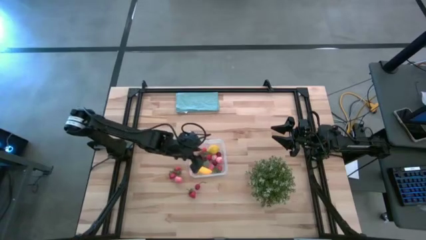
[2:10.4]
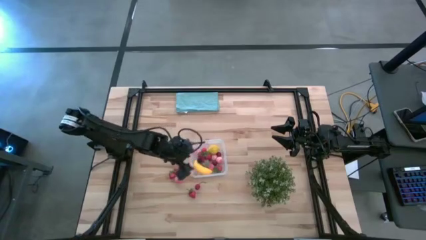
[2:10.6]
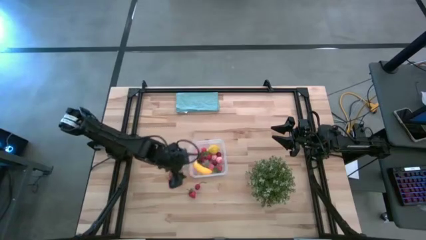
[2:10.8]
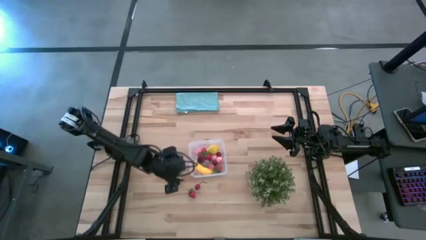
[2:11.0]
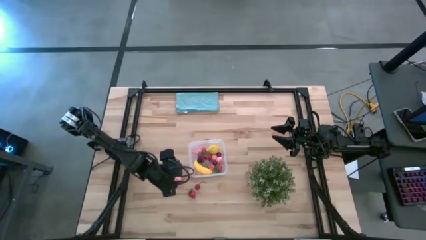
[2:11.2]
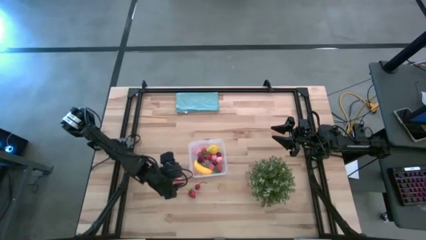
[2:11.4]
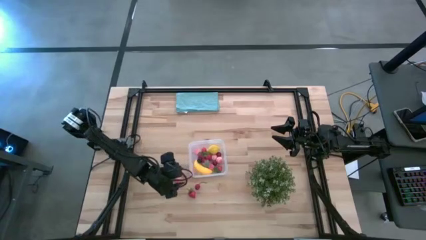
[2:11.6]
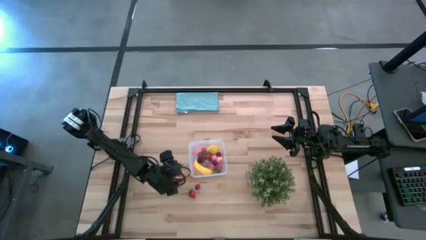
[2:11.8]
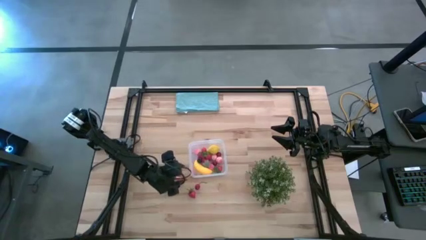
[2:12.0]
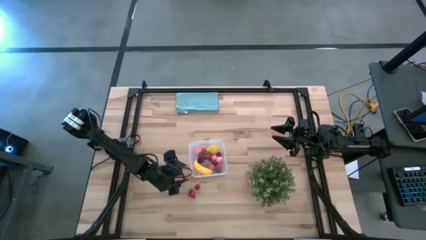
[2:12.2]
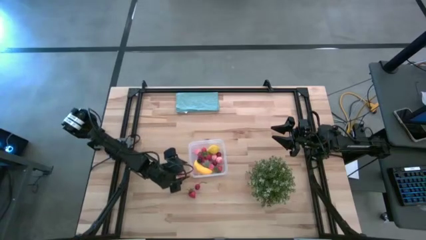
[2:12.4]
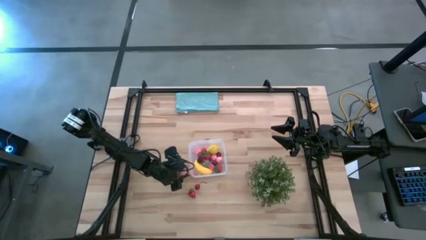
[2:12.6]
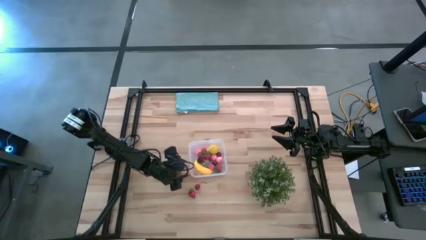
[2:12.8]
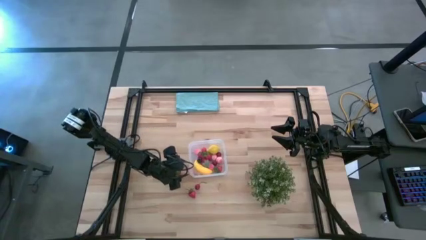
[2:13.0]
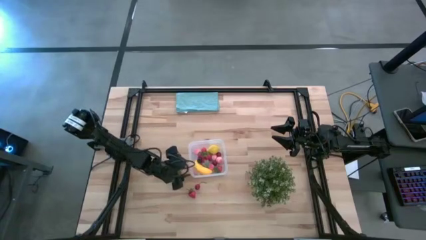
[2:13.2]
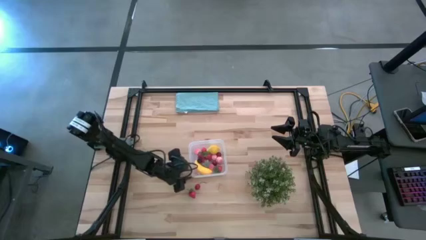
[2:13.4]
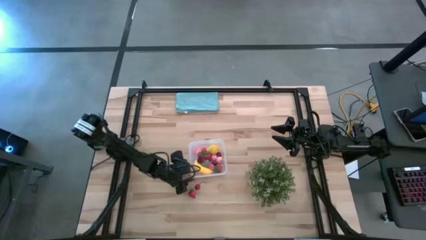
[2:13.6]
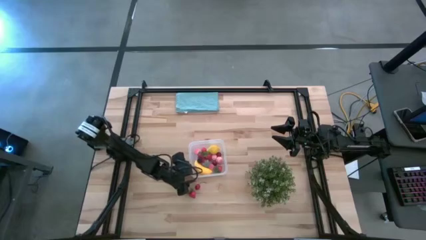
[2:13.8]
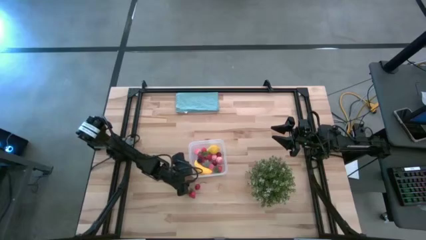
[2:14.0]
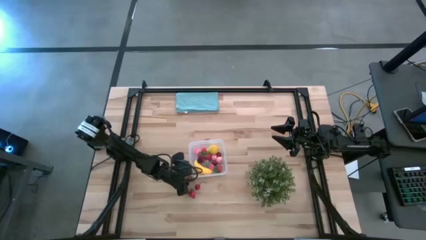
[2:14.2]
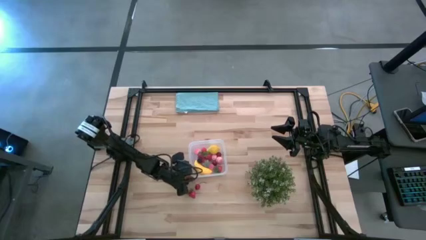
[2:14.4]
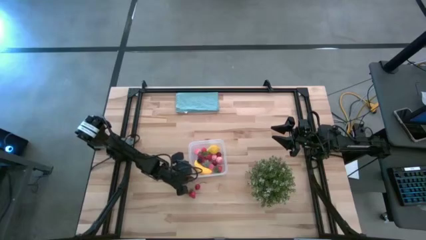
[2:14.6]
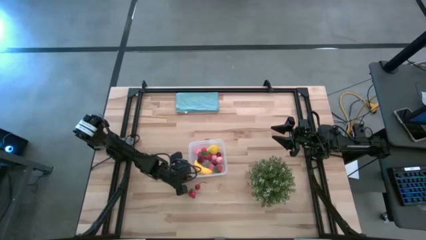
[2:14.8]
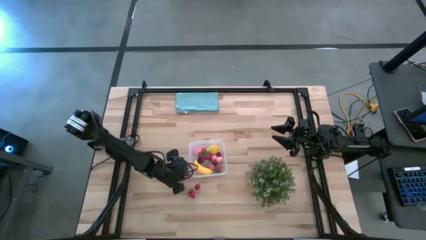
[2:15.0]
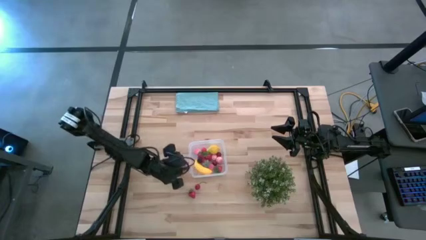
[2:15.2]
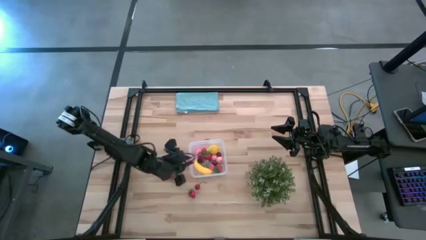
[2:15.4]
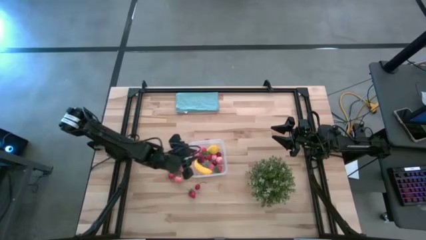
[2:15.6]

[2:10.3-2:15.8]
Task: Pick and placing Produce into tupperware
Put the pink peach into the transparent bin

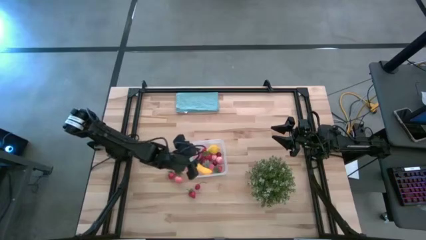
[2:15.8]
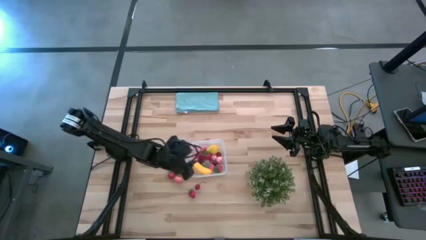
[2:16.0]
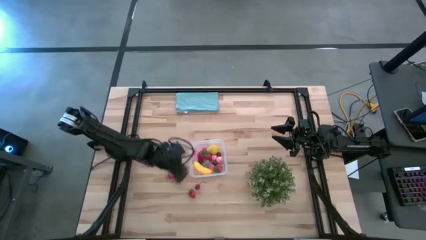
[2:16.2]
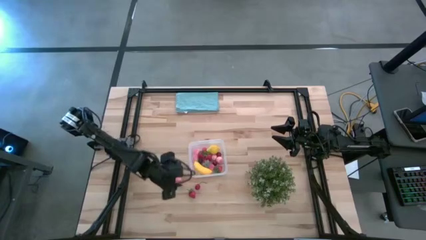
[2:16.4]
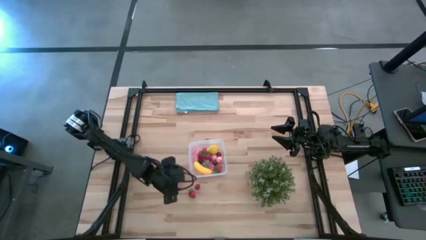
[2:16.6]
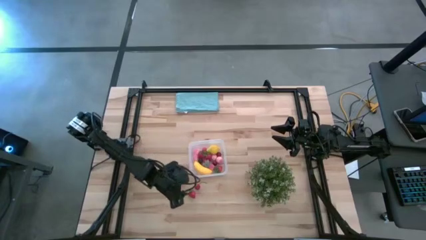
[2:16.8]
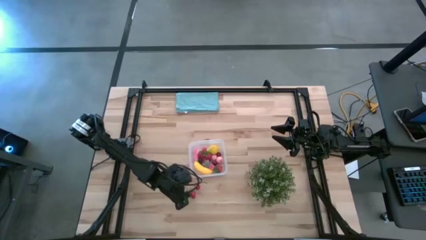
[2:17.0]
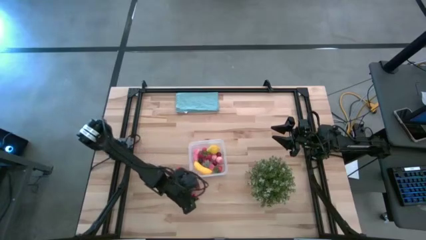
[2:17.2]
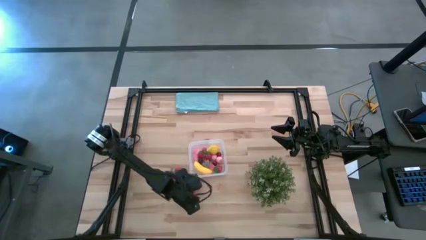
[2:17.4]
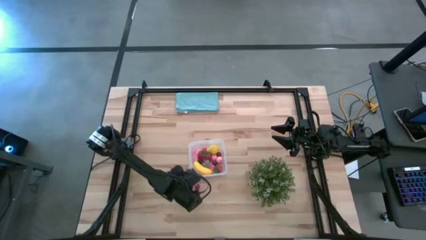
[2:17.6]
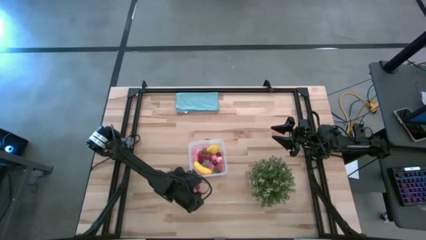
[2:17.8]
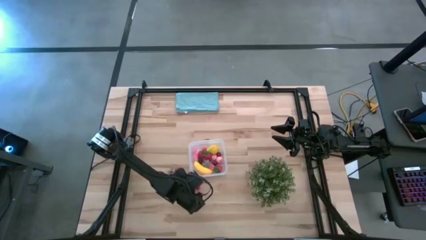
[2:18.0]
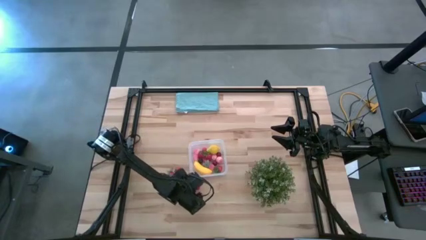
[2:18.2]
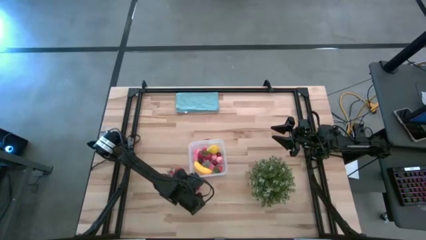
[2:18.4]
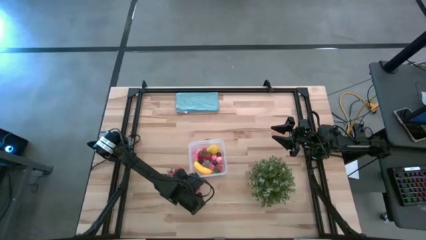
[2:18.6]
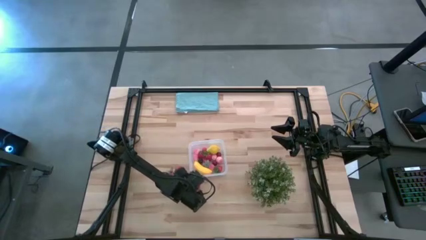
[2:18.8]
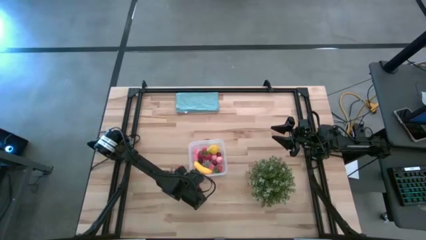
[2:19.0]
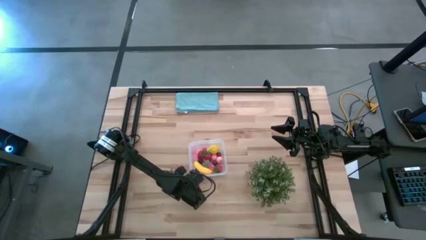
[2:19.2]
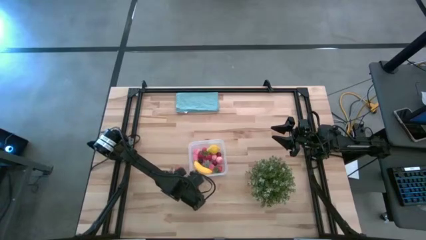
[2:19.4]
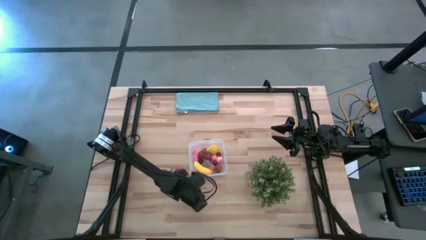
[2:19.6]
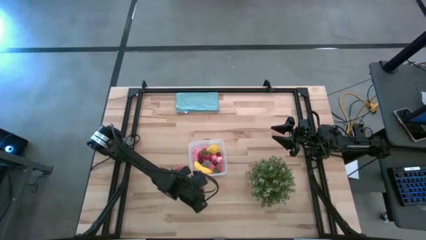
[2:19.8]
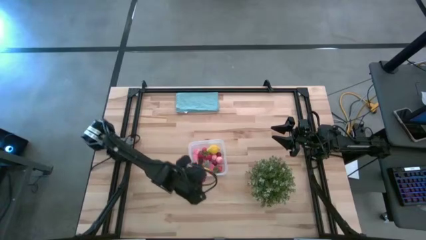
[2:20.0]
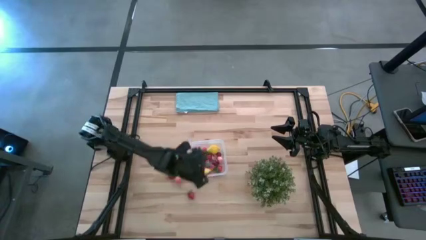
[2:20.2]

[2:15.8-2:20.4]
Put the red cherry into the transparent bin

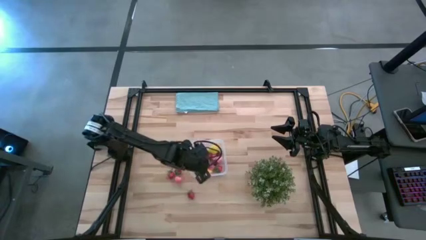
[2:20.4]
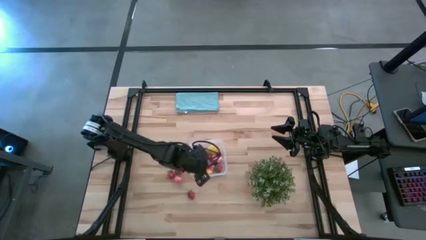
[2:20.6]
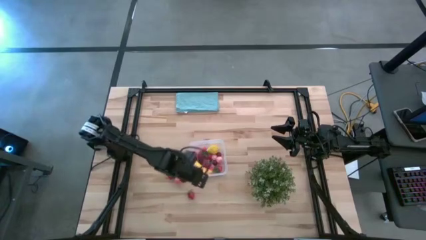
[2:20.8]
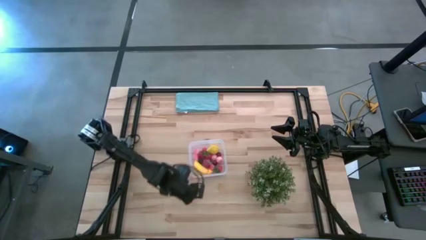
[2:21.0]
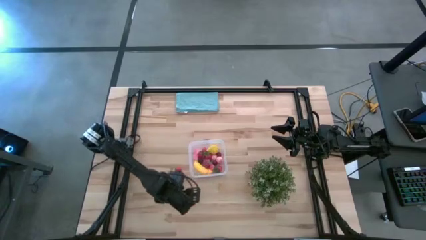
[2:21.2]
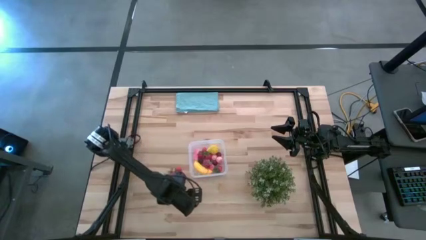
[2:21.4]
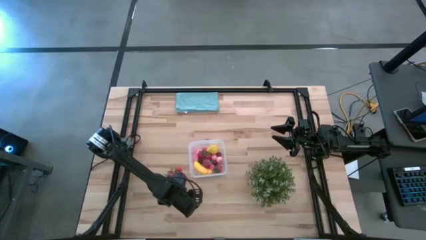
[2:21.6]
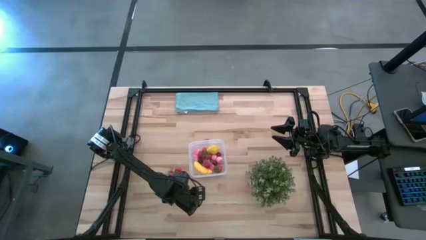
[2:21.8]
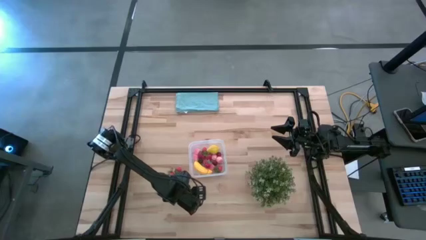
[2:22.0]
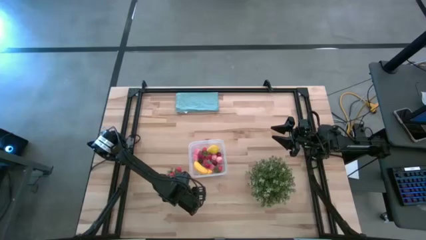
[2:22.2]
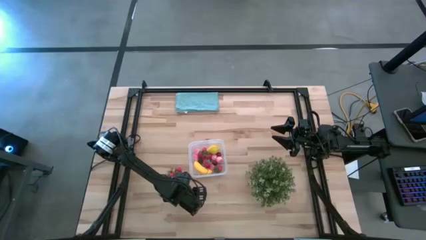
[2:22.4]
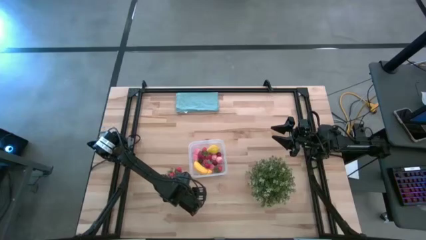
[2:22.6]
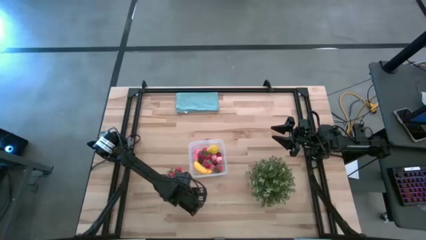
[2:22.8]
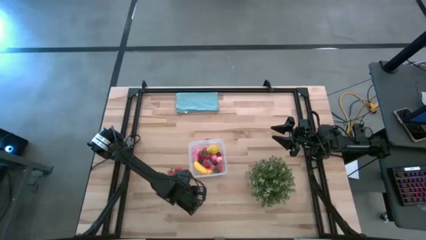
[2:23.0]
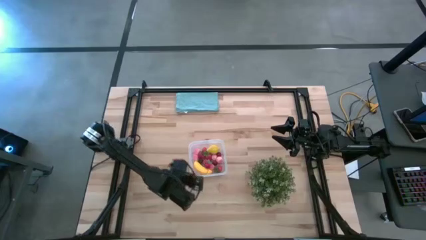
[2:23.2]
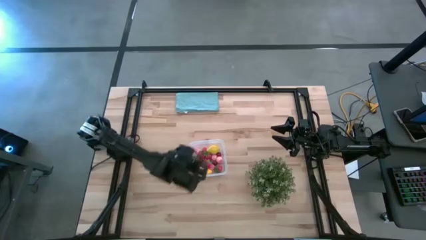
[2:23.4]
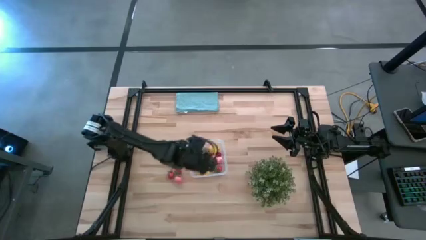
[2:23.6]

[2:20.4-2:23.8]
Put the red strawberry into the transparent bin

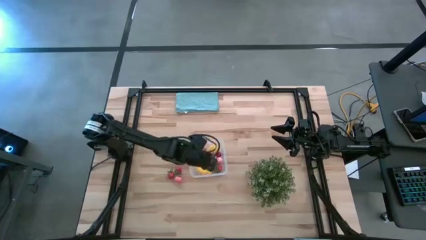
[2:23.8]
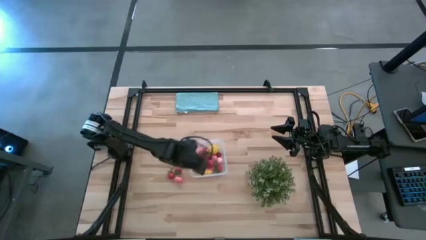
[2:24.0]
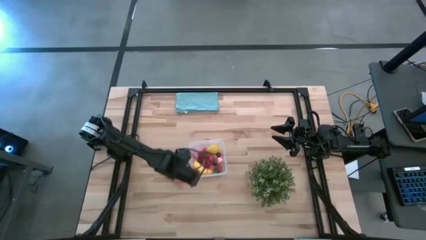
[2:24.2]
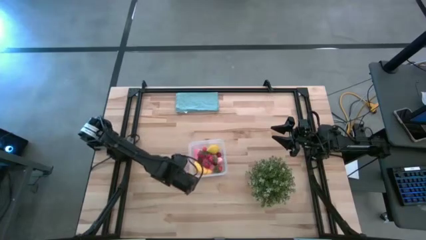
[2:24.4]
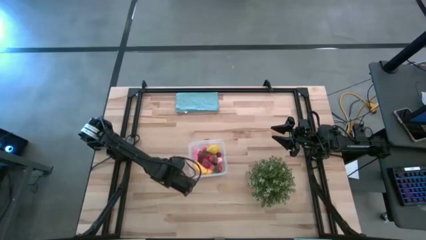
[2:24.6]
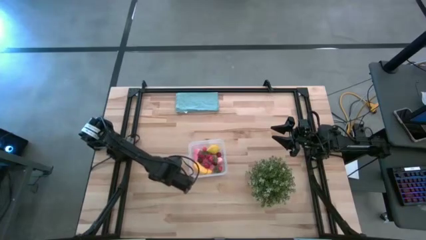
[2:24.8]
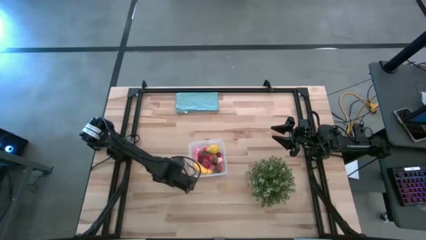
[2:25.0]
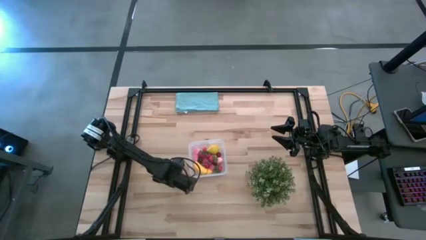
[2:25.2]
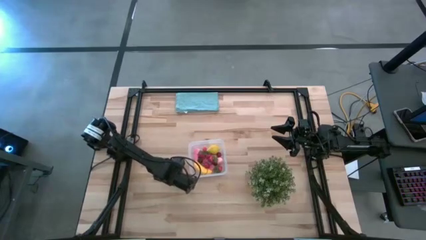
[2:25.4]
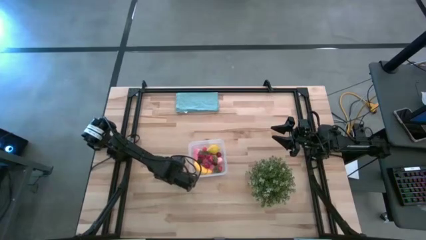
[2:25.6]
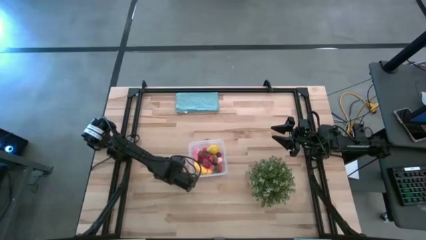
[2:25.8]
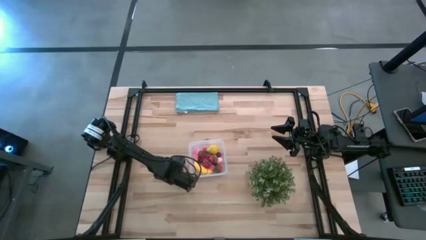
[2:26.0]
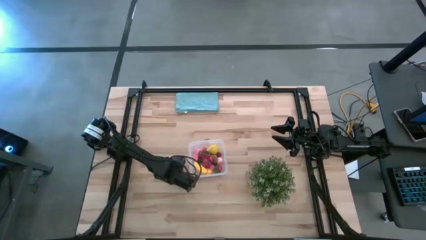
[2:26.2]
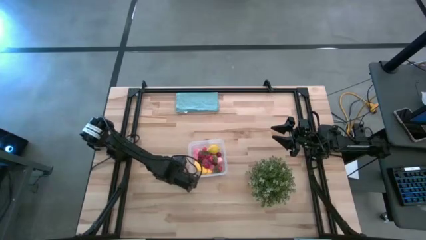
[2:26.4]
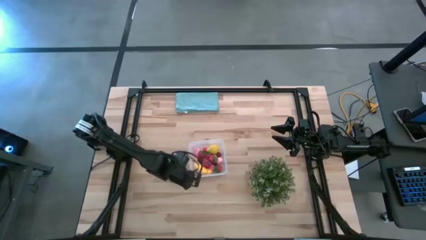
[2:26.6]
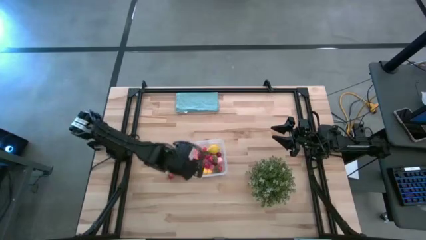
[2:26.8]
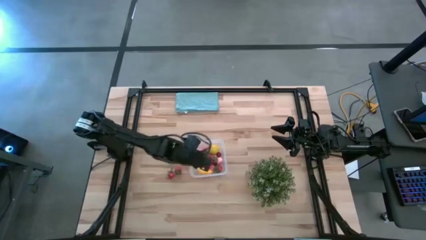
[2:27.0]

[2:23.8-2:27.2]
Put the pink peach into the transparent bin
